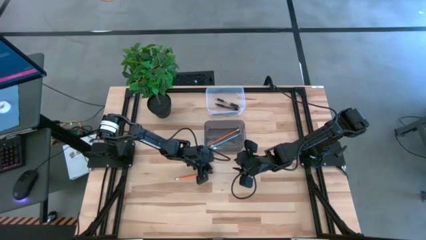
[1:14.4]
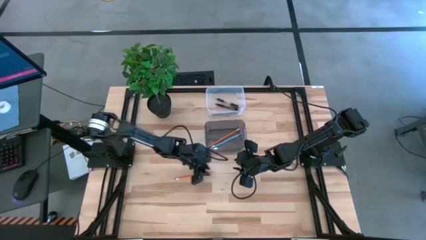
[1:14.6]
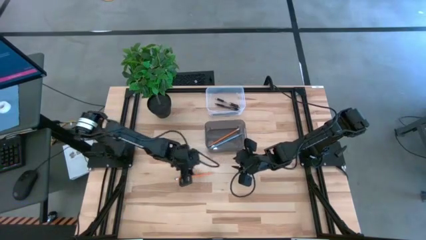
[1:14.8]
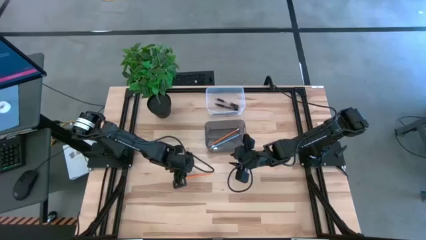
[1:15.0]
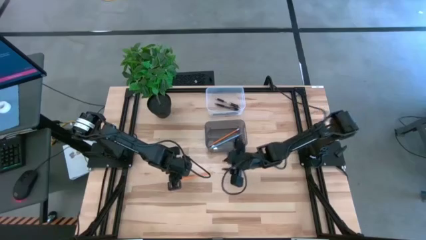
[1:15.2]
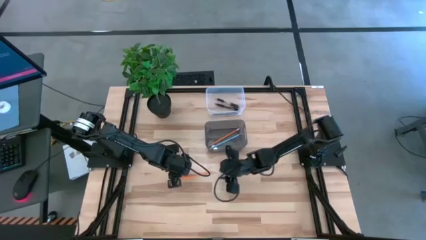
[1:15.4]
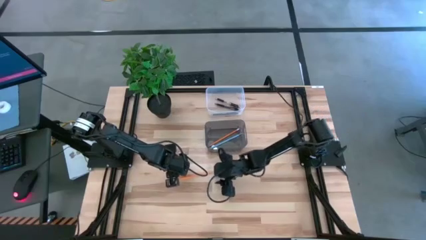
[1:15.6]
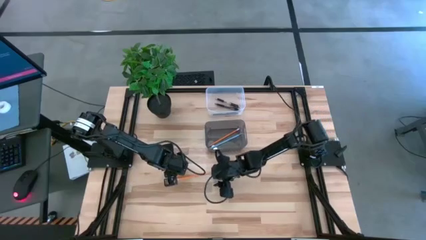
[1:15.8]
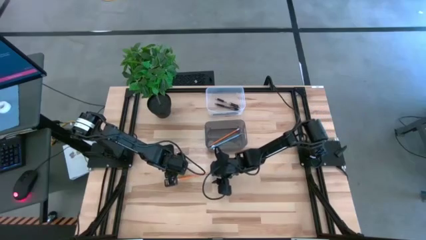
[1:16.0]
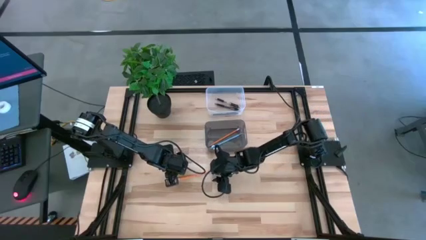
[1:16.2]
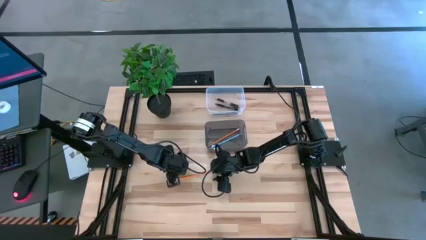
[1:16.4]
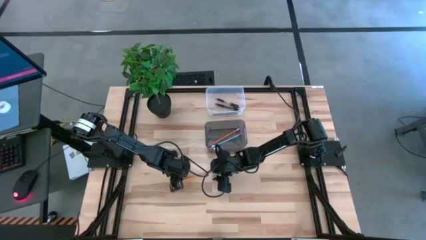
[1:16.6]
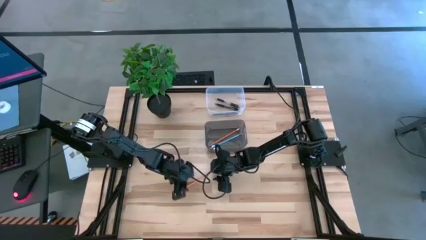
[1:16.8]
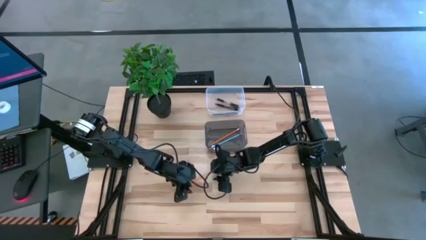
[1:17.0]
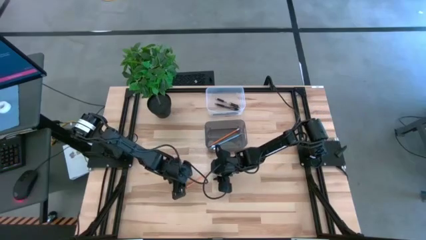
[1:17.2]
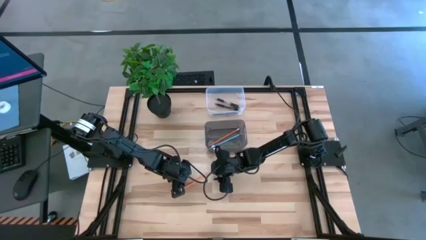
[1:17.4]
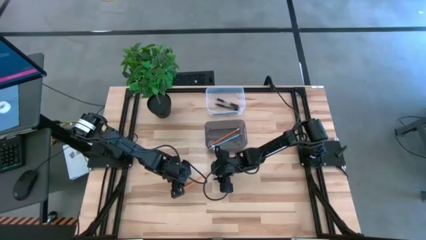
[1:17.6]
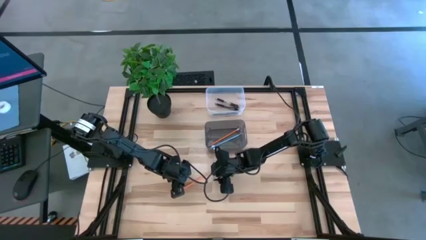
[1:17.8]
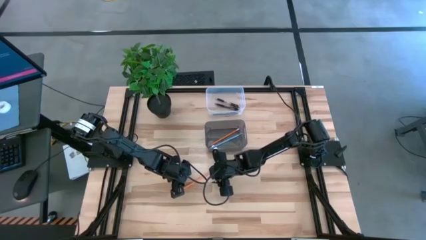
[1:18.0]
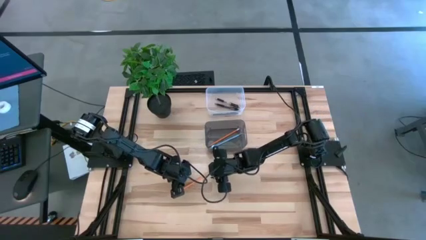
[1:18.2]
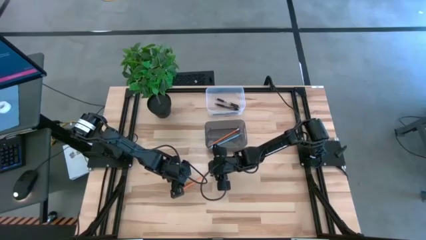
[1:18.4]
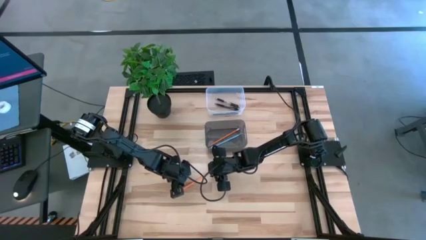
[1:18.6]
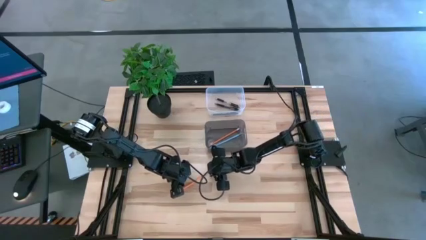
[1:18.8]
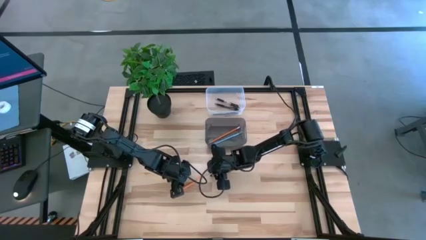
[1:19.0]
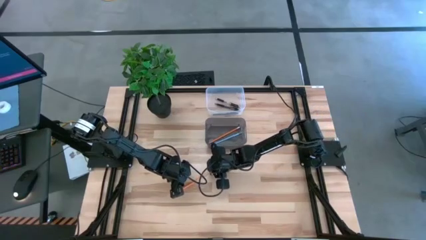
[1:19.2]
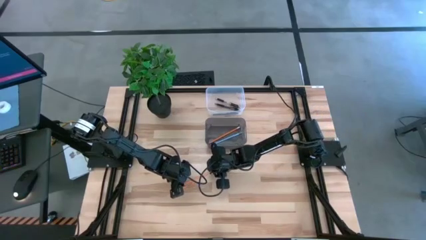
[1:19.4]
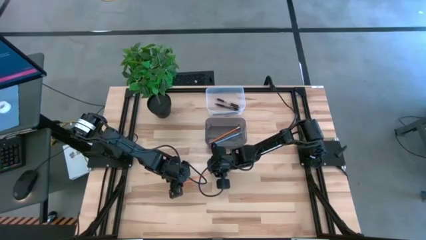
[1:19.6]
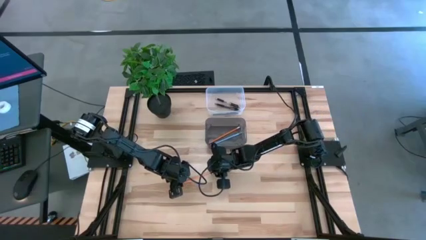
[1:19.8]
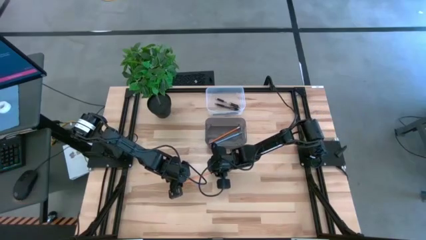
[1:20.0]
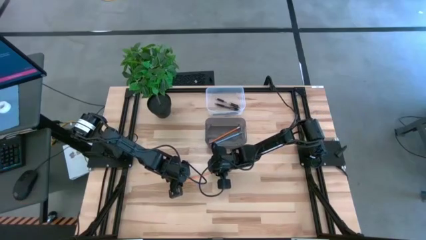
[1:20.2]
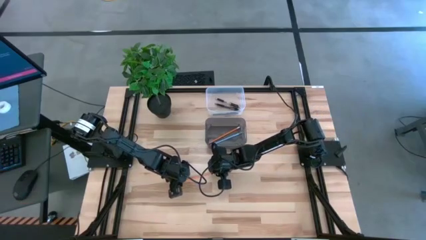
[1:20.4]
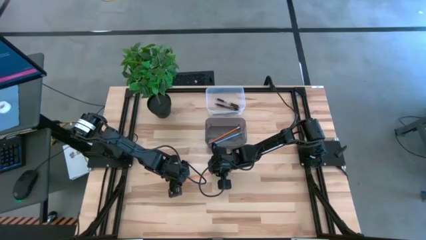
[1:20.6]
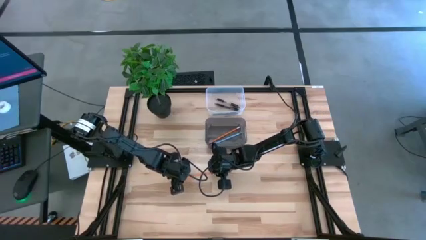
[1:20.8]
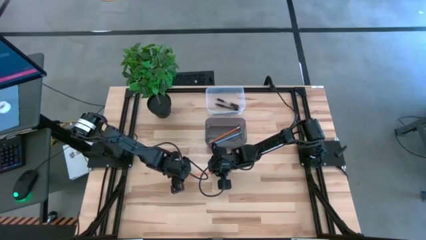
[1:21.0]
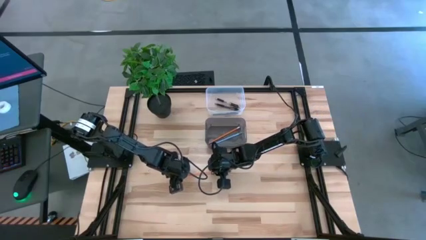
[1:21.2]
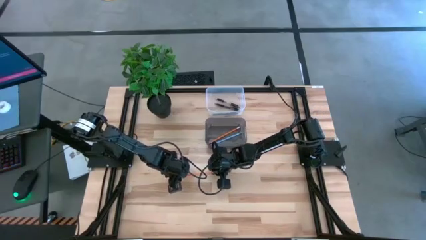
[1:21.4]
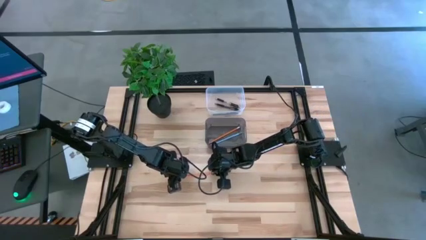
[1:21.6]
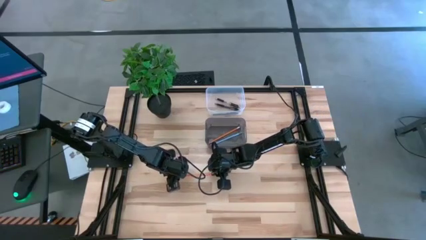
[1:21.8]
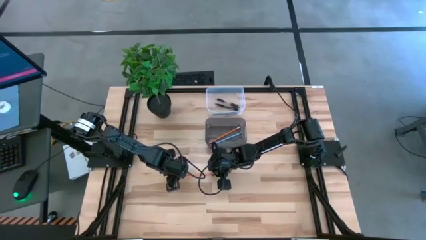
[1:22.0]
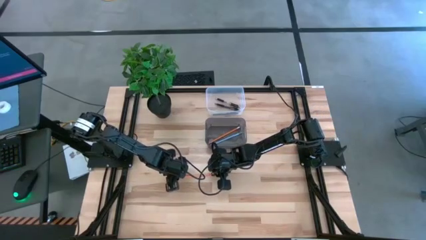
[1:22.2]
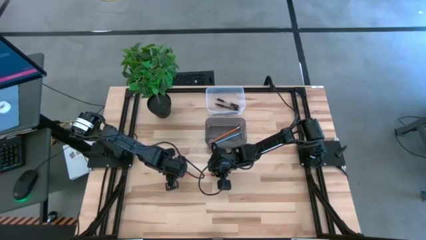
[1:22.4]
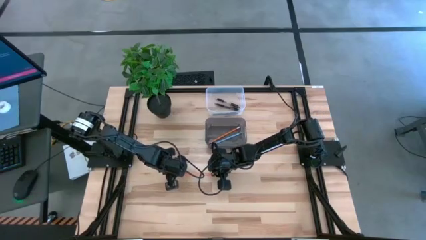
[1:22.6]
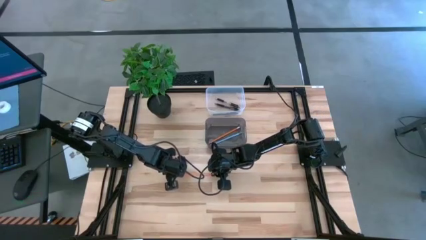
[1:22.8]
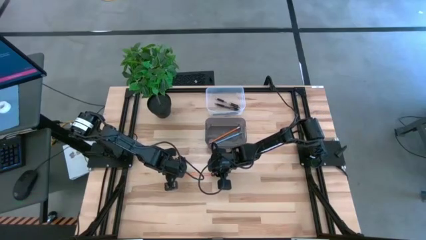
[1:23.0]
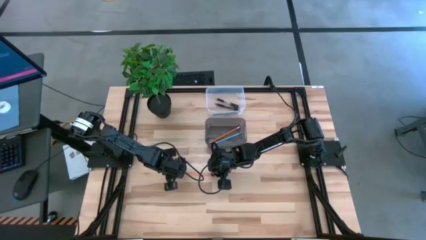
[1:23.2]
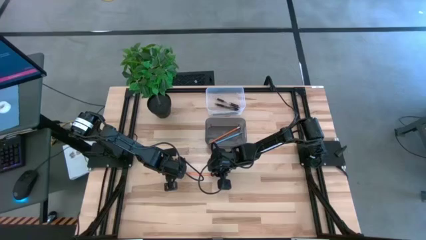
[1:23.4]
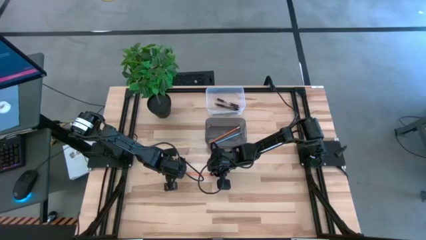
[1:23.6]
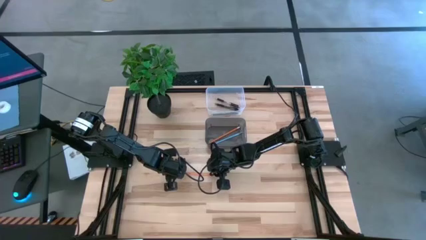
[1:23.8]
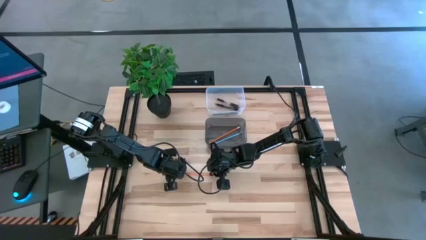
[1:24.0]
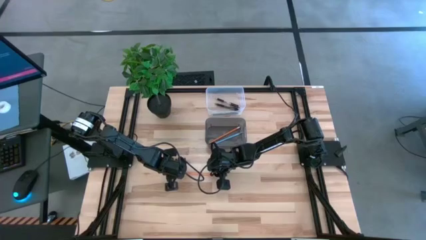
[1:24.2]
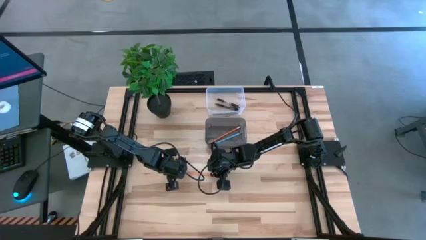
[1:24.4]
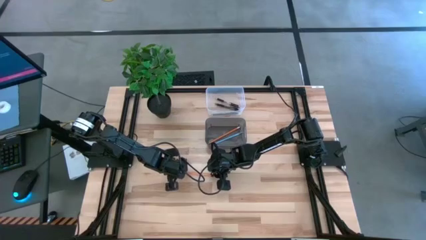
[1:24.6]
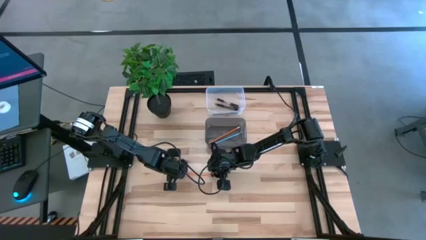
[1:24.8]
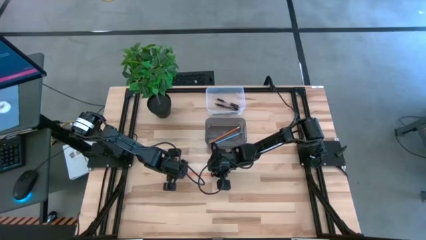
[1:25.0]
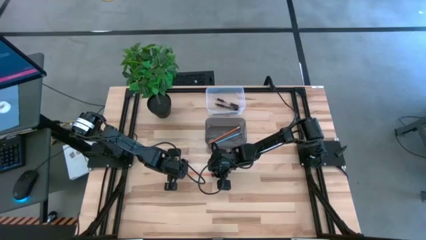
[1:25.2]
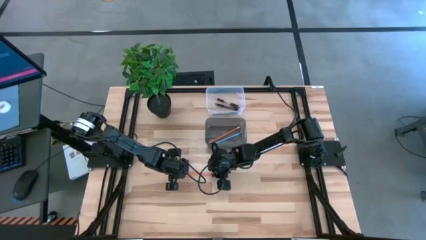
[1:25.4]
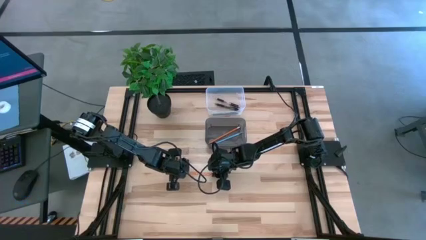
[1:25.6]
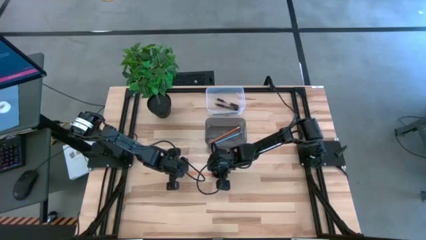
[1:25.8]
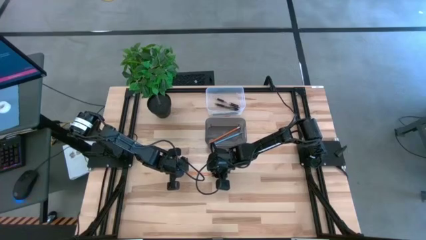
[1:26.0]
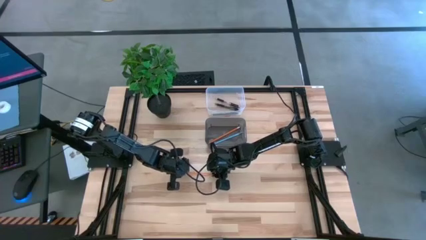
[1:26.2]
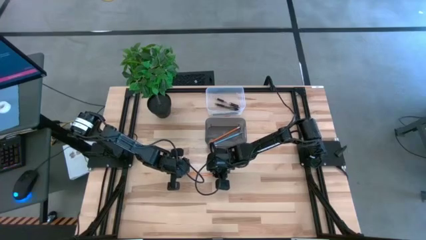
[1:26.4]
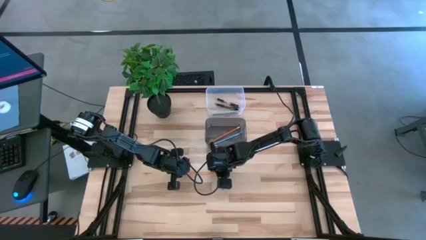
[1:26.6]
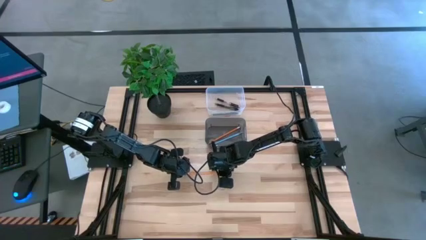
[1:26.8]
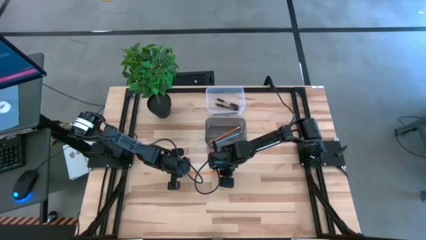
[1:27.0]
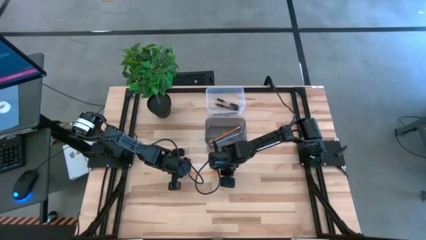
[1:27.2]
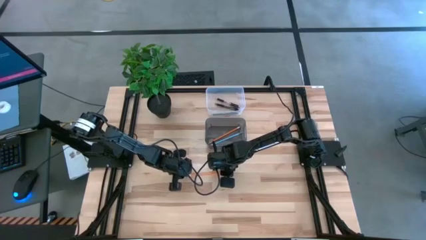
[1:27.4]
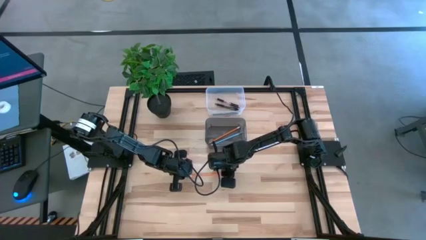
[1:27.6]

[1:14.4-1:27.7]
Task: Sort pens & pencils
Put the orange pencil into the black bin
